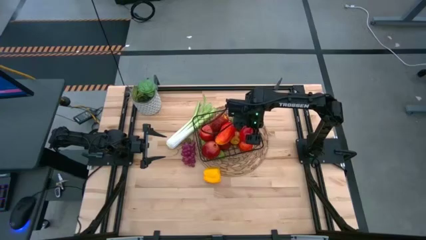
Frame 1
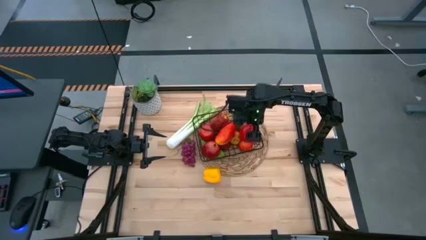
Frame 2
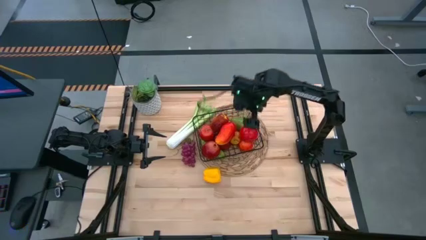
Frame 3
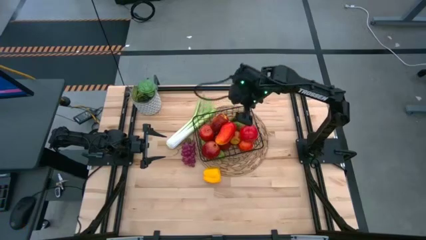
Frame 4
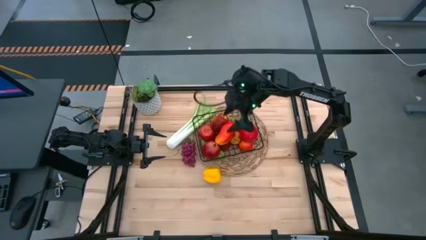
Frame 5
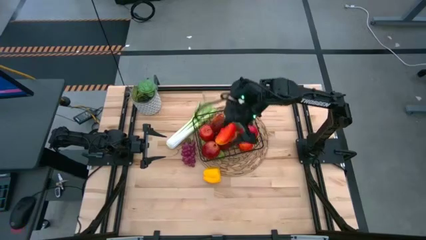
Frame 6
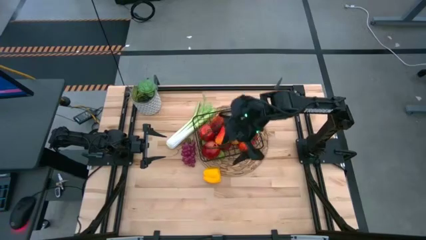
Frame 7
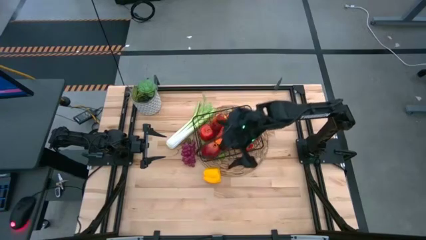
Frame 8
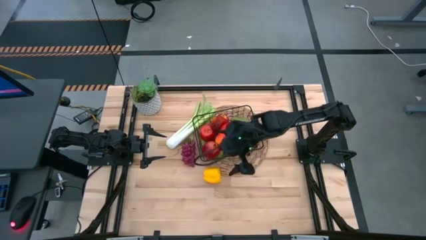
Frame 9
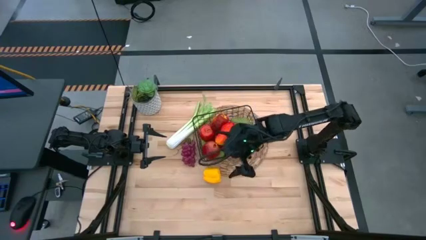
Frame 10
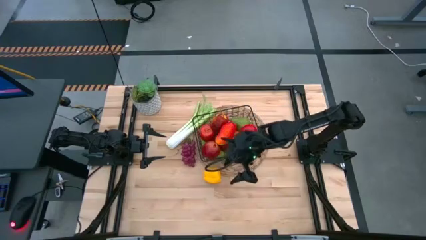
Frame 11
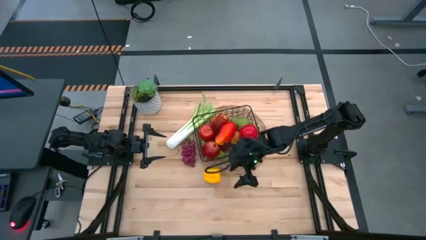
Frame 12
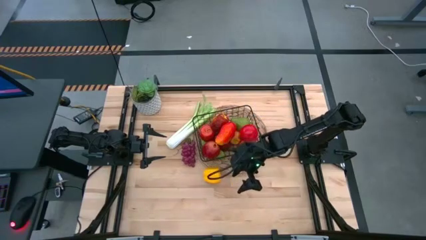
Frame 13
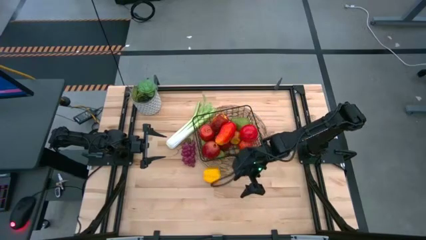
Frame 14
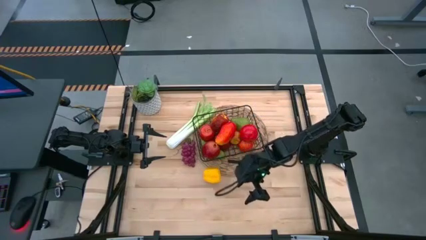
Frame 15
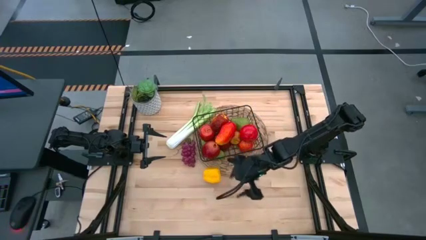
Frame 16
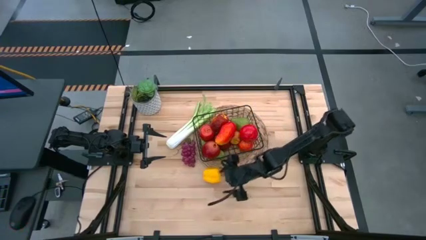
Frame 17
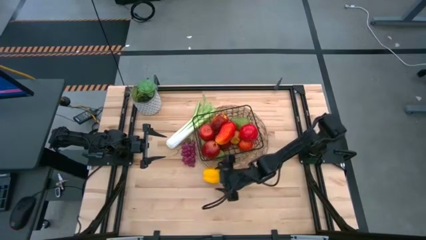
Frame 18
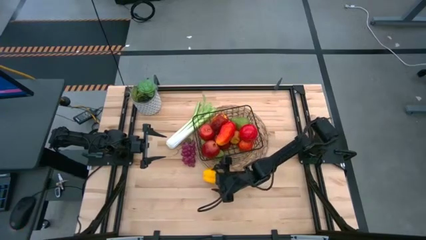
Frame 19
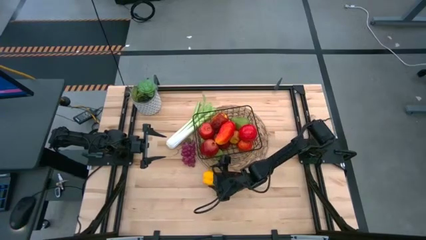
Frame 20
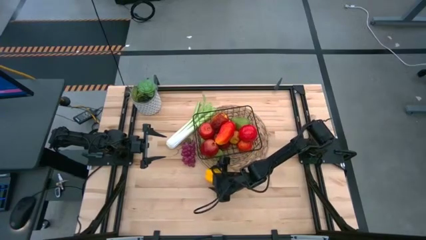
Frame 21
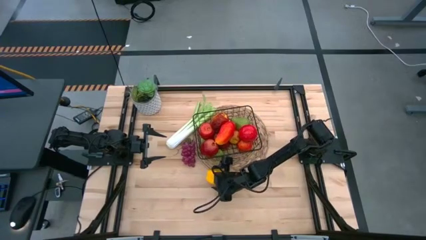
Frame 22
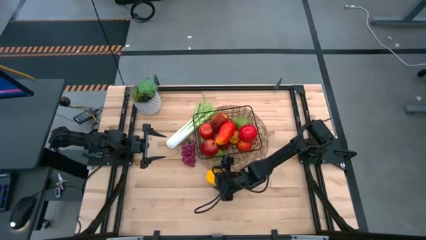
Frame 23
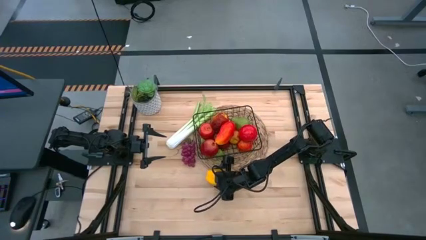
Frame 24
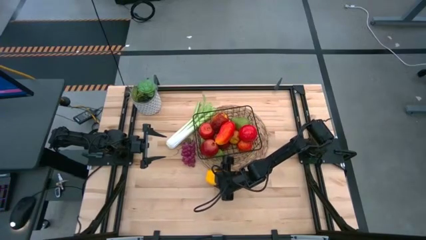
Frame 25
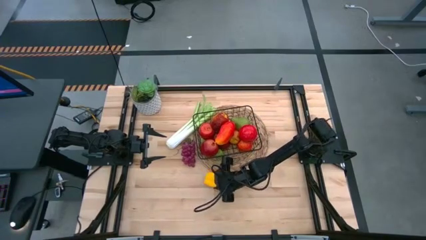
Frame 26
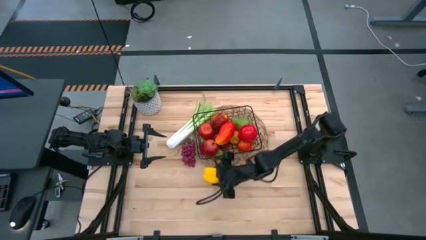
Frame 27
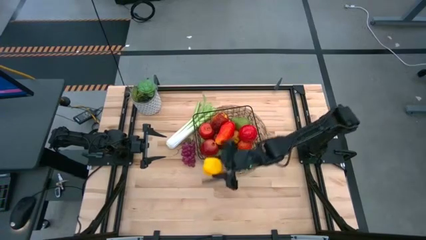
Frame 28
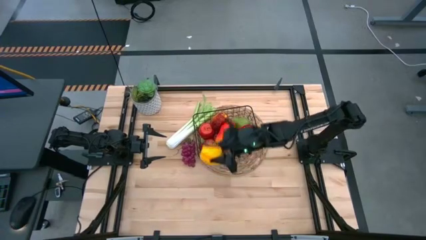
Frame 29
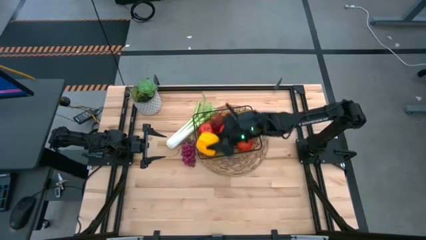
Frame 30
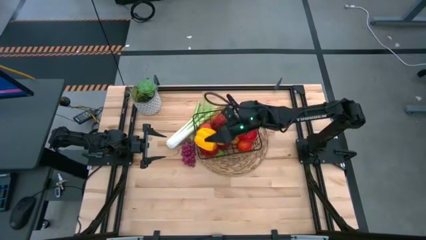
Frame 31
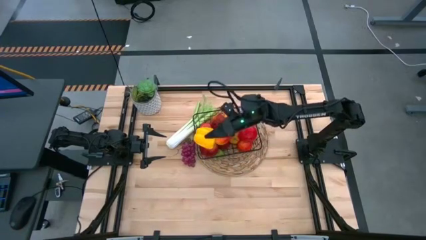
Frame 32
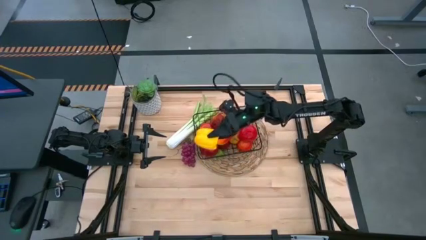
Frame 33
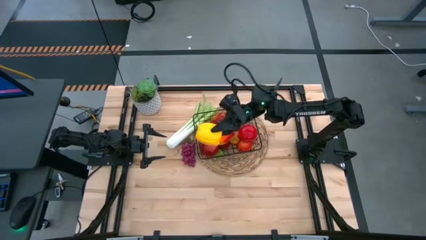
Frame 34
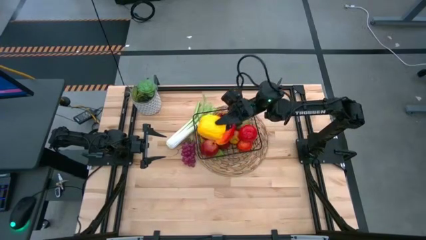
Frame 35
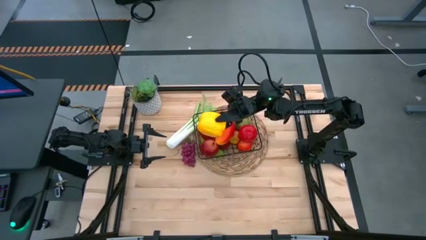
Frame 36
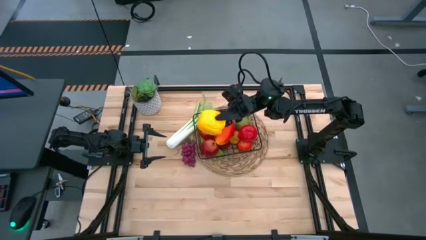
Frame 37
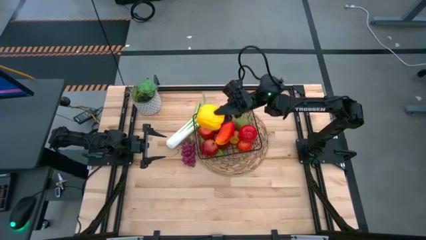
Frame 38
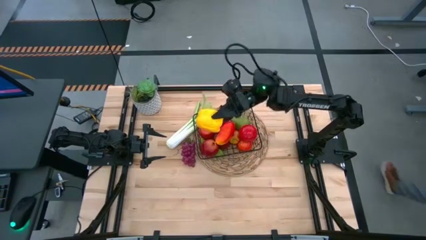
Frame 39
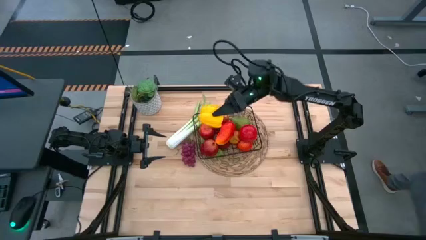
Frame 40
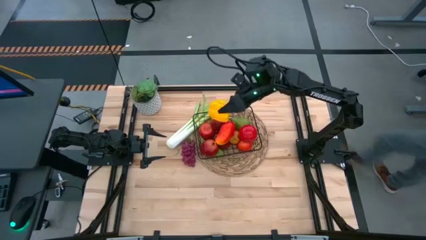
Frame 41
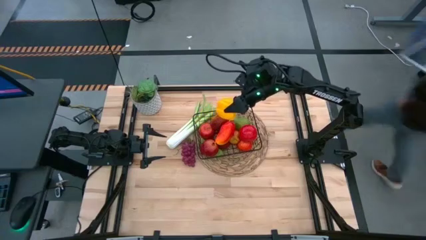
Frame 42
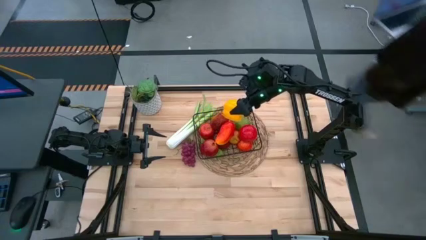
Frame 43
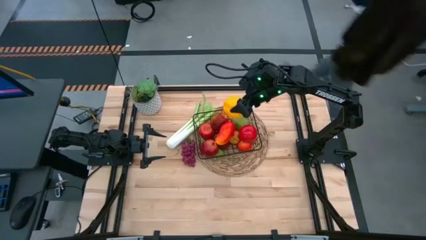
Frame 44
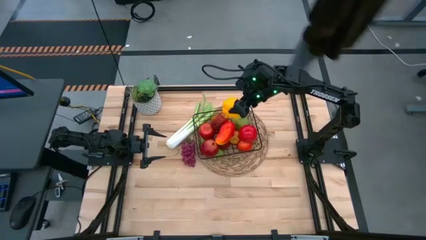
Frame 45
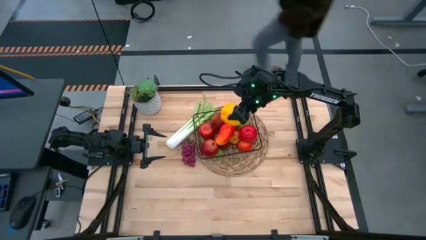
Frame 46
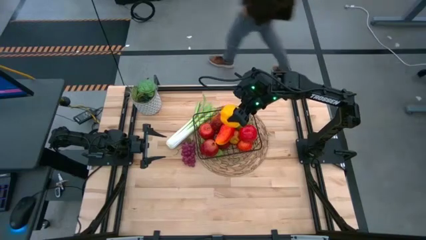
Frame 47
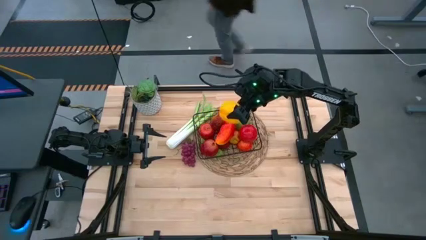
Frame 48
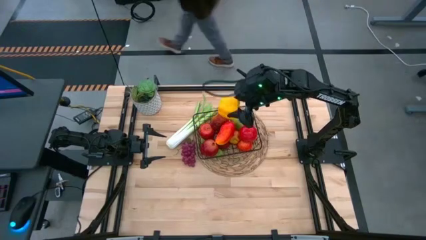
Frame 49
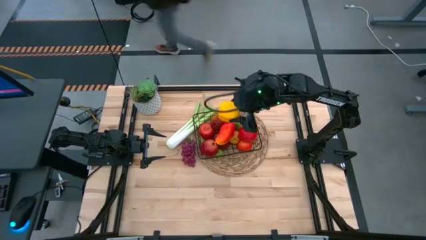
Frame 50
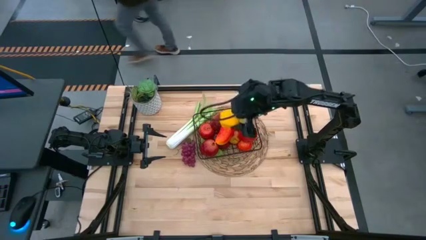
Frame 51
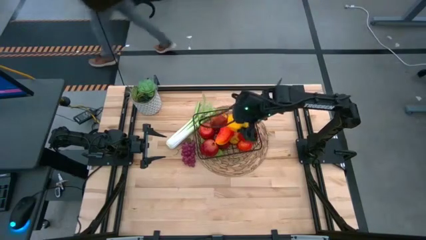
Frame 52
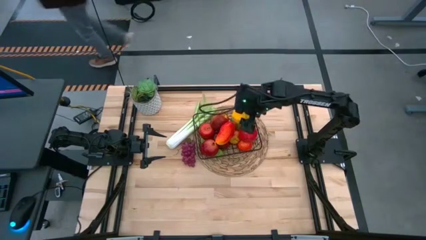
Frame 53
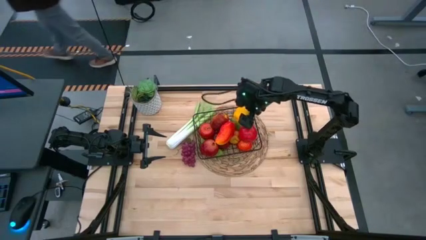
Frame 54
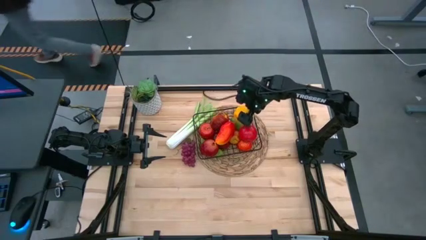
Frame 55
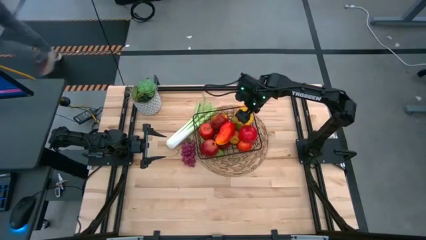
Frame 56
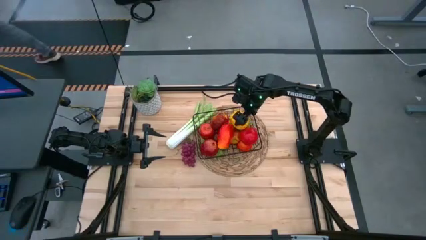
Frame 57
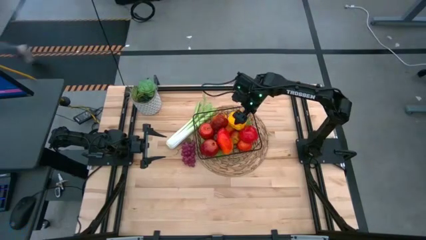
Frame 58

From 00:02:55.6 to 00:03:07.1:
Task: Build produce basket
Put the yellow bell pepper into the black wire basket
